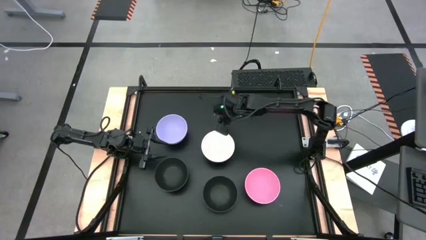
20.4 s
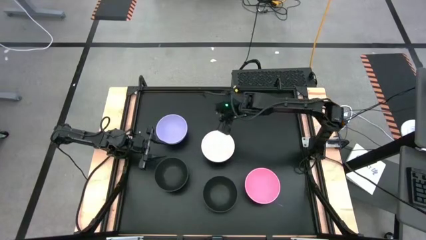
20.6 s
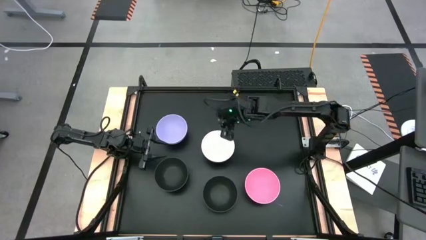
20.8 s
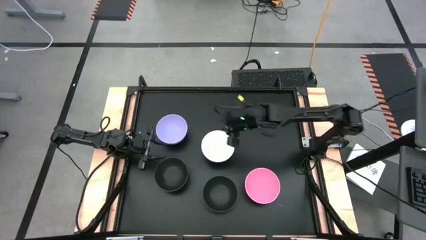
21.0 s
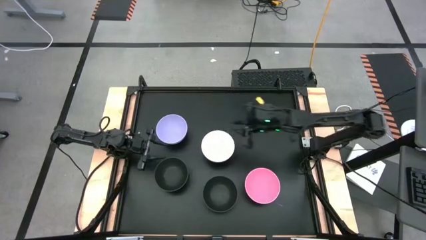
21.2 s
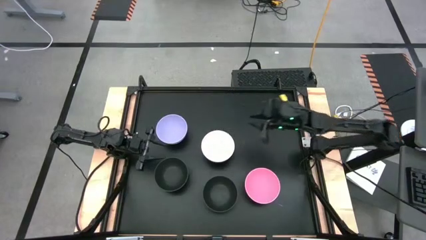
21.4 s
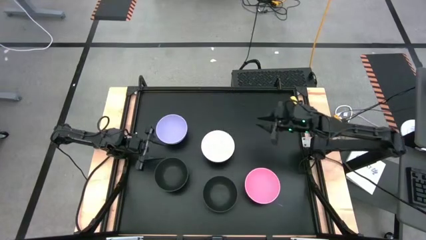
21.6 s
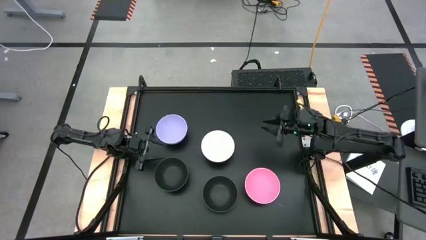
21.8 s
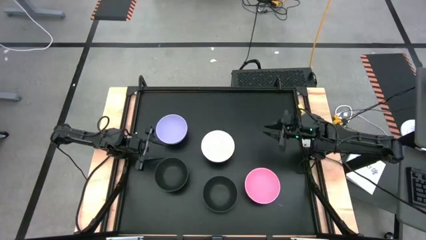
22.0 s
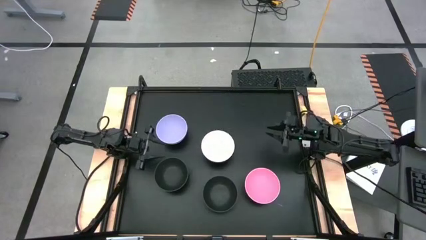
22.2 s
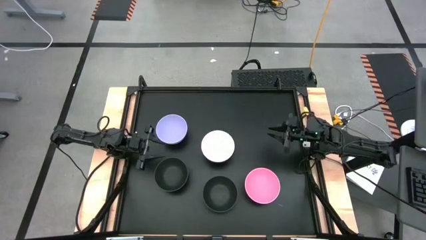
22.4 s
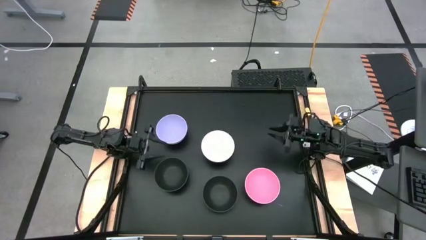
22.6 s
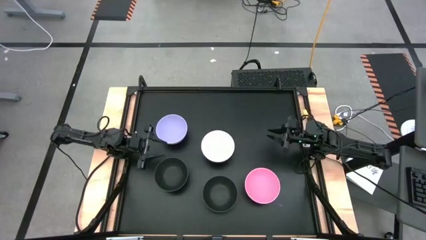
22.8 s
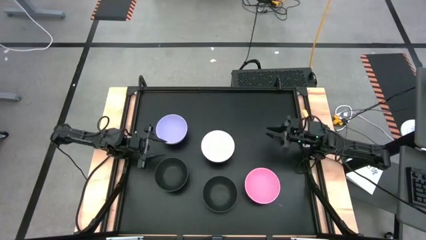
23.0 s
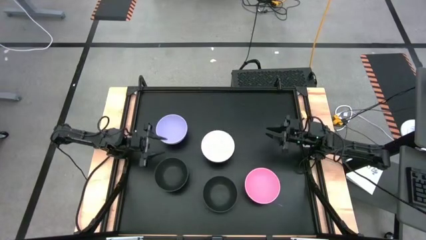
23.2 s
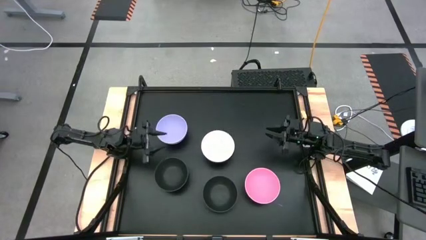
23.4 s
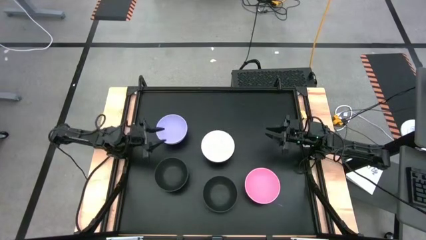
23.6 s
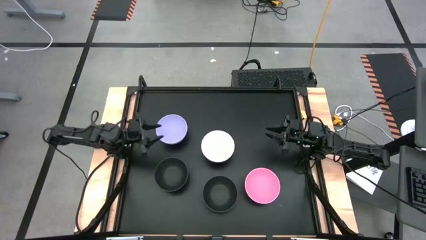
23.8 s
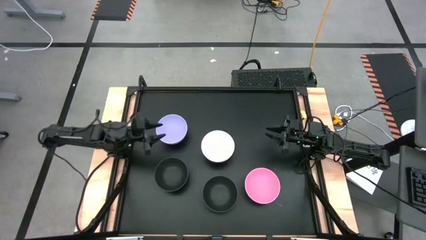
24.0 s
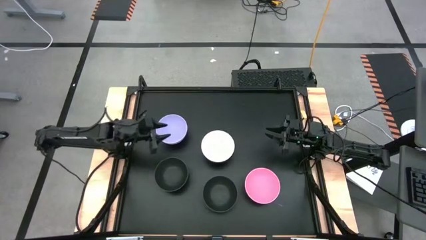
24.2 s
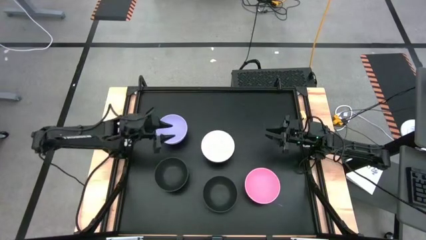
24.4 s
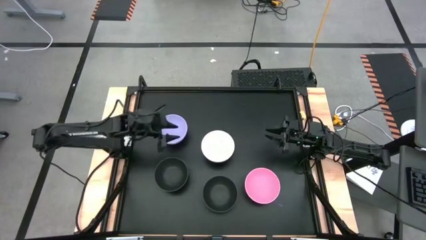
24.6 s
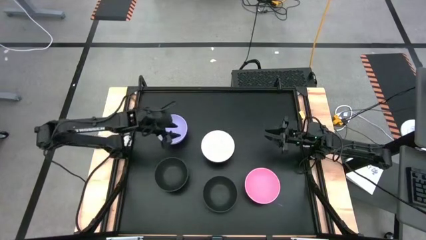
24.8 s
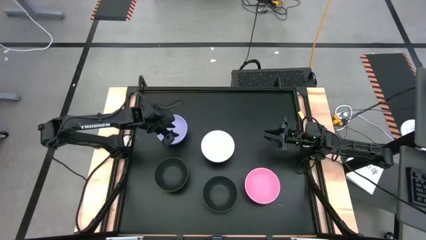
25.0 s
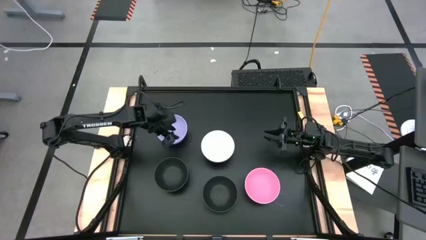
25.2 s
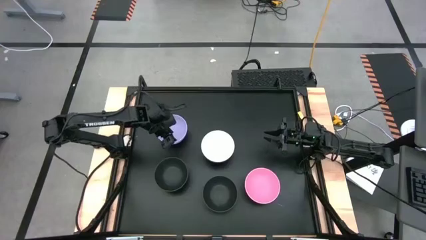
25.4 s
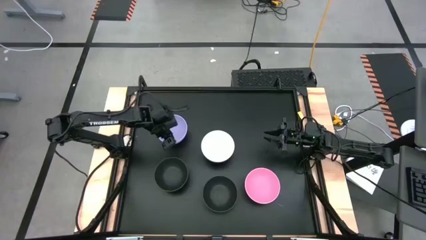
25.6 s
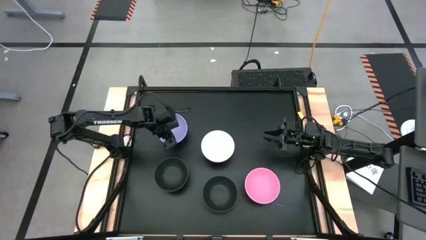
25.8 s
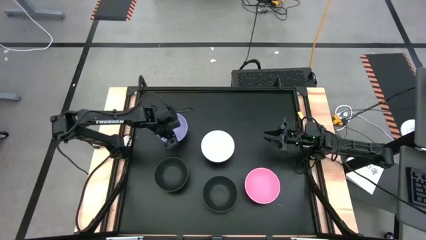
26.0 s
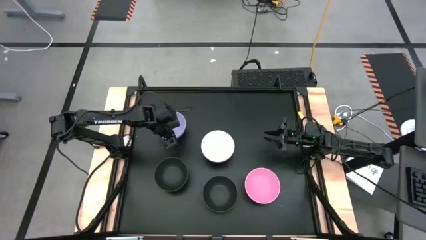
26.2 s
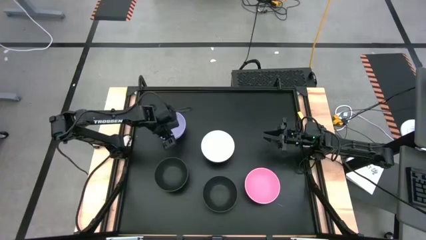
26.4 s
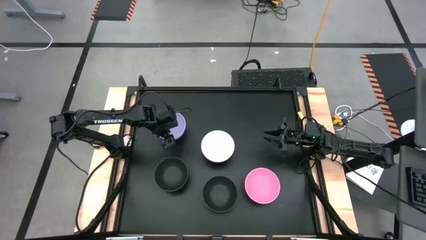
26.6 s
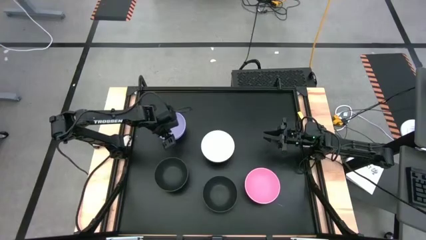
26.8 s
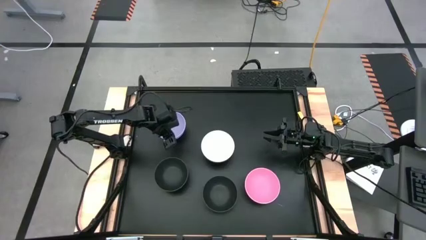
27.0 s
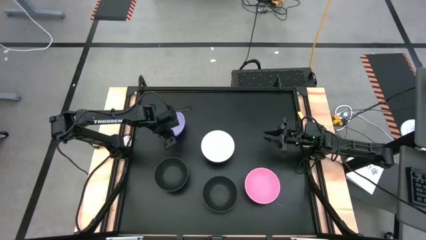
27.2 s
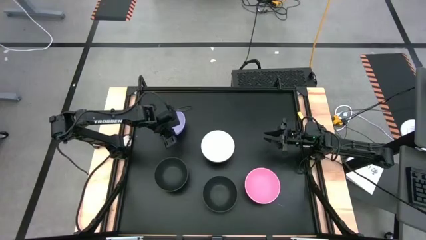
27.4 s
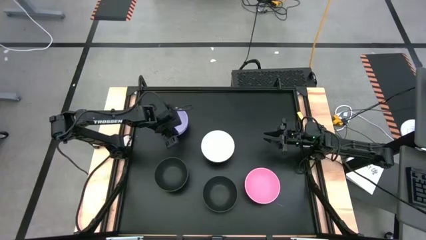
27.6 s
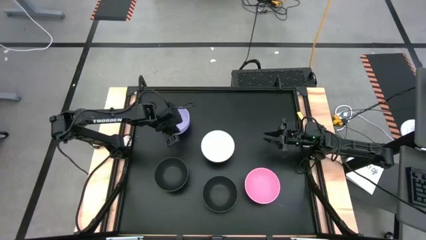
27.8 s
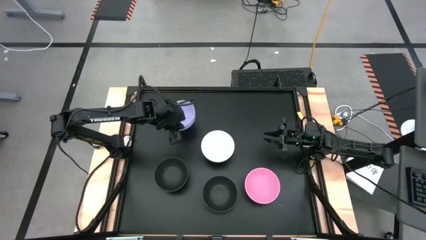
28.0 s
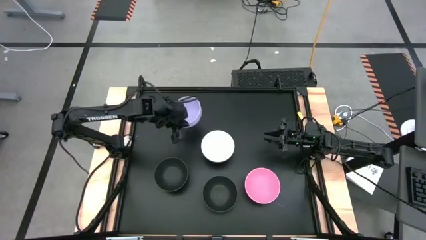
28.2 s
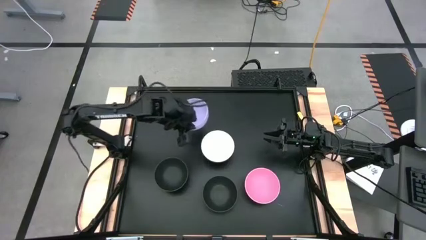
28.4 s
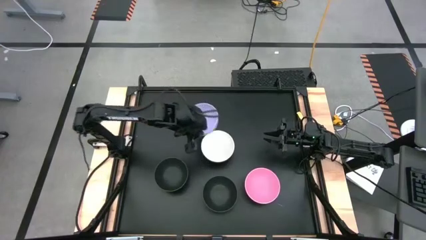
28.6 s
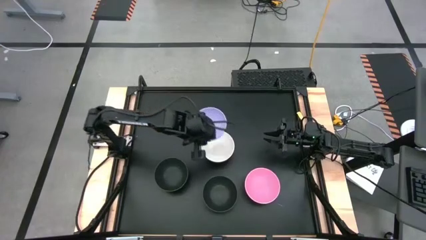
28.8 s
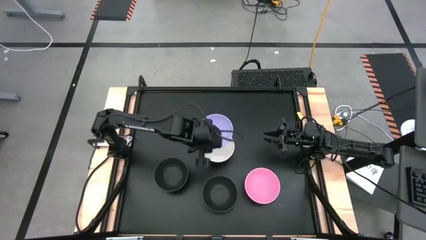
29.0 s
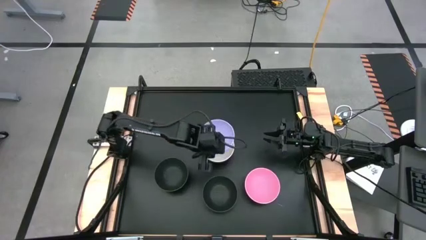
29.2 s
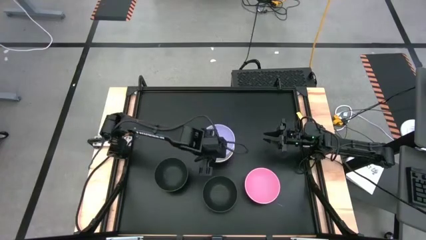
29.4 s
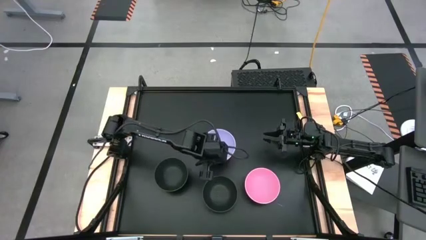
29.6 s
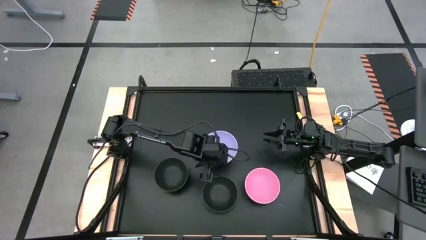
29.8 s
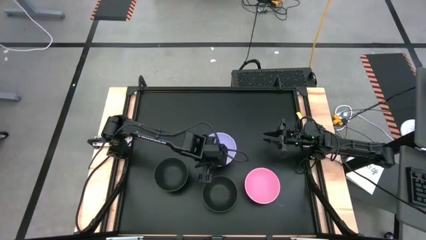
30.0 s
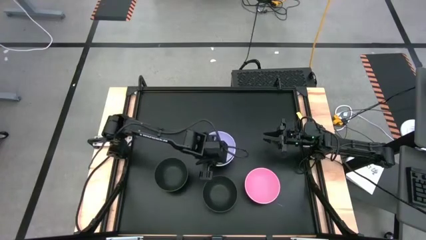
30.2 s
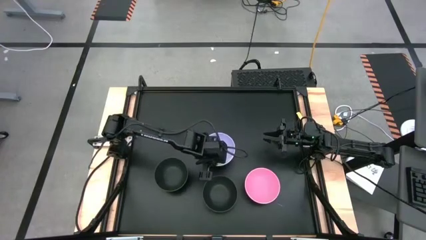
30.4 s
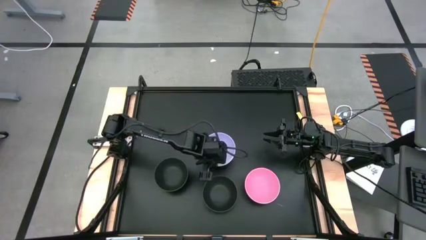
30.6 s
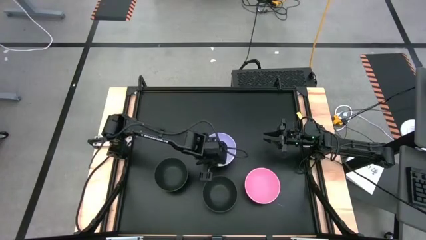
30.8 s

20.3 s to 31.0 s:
Task: Nest bowls inside each other
Stack the purple bowl on top of the white bowl

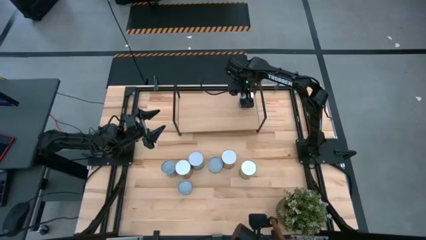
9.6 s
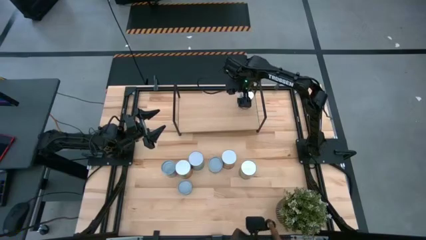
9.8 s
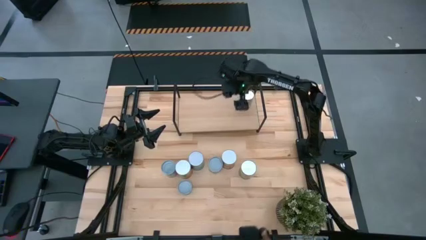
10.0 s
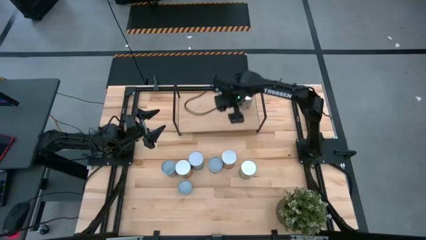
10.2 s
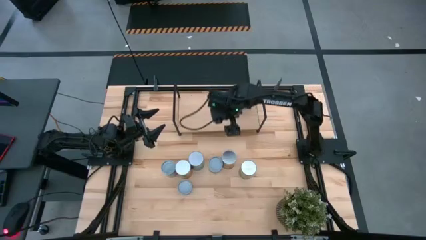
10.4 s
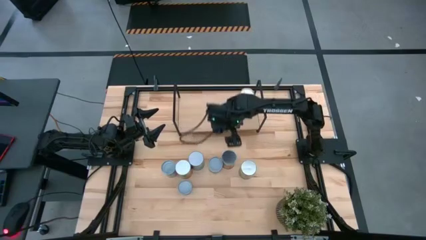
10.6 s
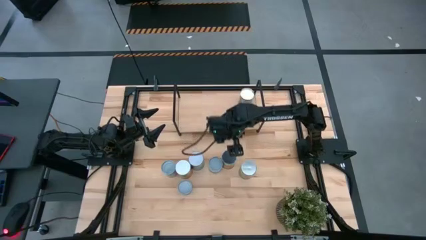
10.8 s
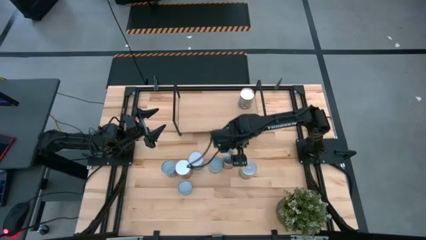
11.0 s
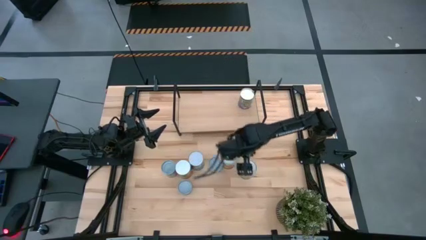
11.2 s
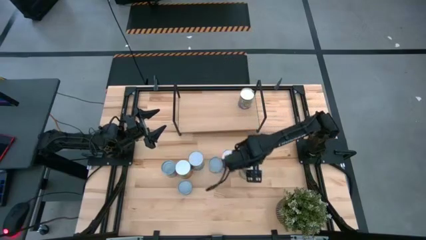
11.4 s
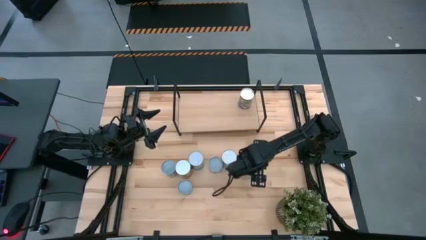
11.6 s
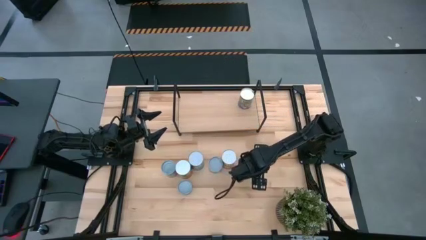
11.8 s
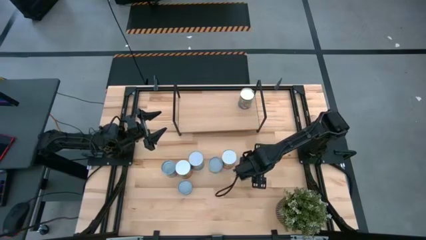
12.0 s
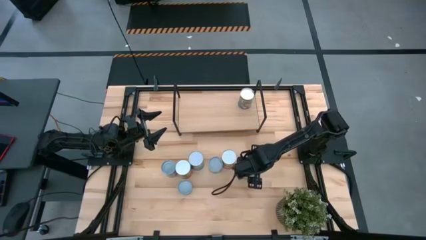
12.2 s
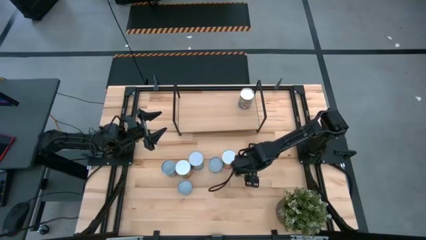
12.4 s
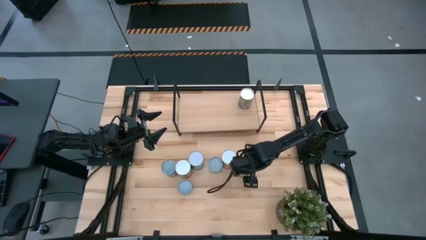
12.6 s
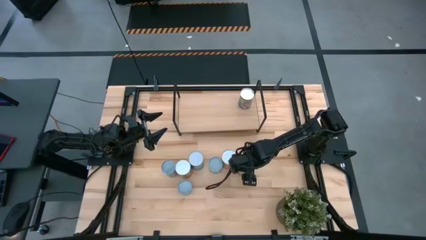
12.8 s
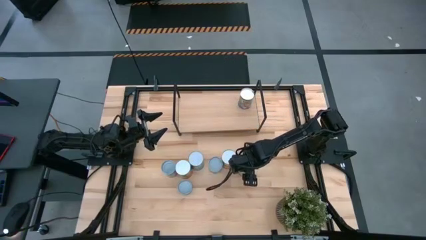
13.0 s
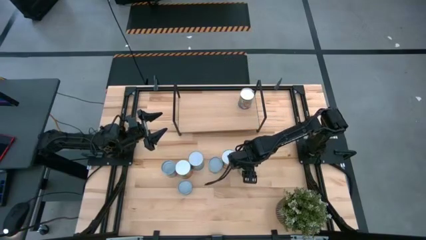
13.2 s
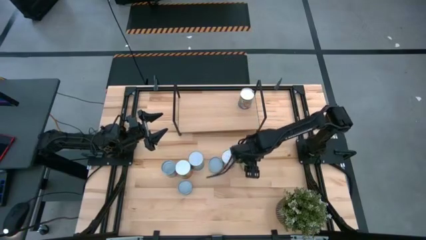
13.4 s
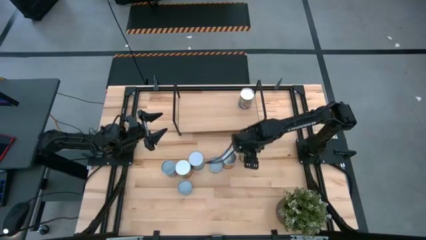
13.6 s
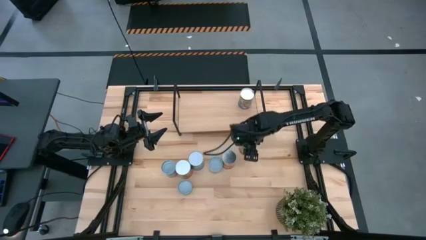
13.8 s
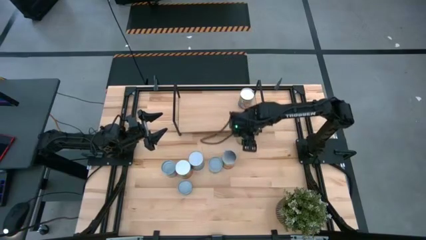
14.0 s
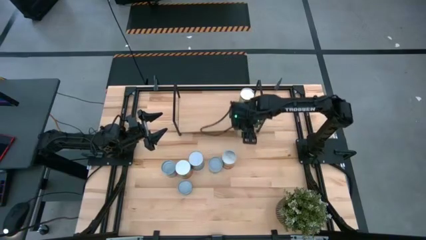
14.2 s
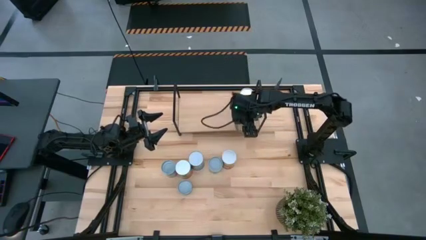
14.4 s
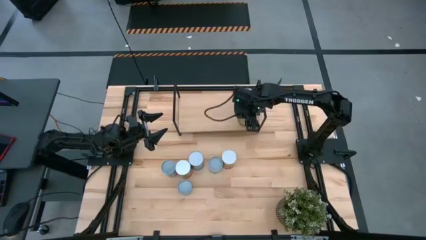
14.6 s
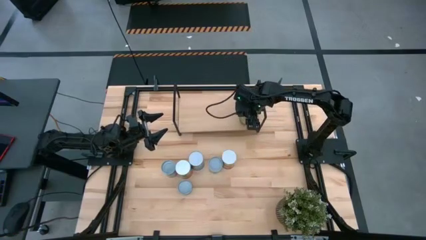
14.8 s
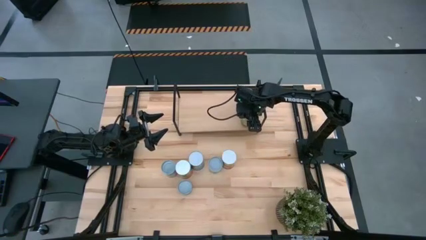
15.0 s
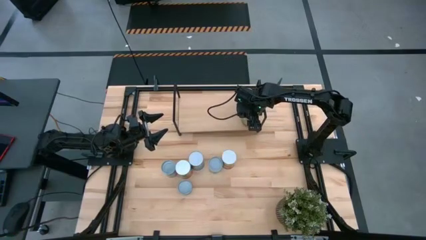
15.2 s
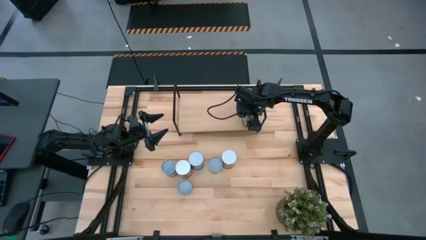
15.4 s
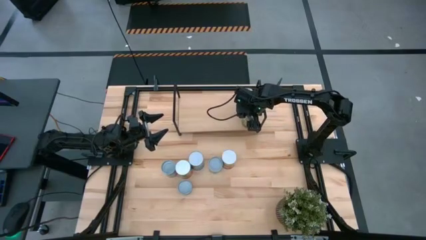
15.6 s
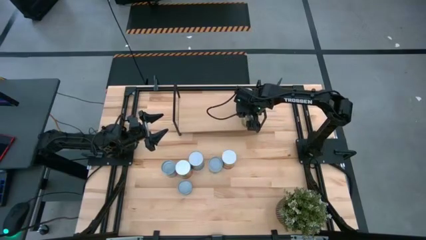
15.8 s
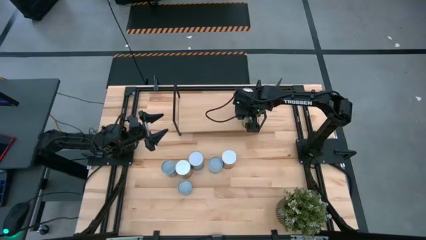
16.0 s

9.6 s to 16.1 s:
Task: Pick and place cans onto a shelf
Put the canned oranges on the shelf
